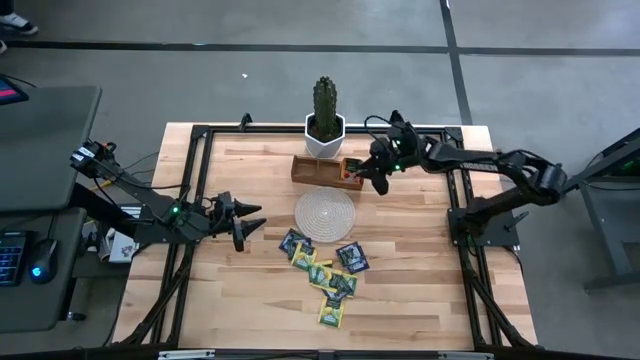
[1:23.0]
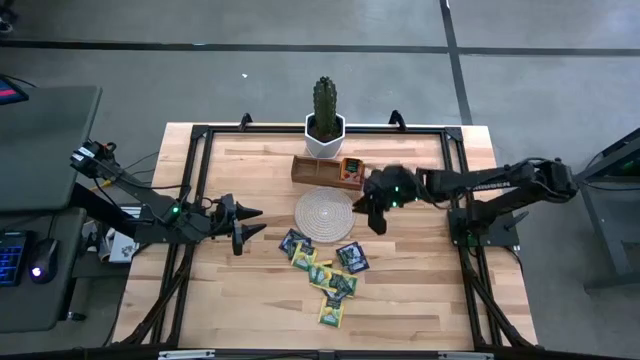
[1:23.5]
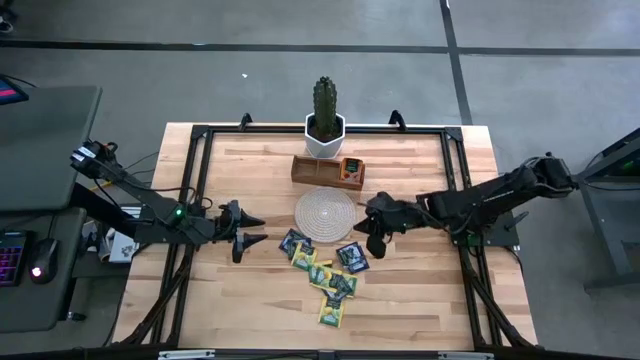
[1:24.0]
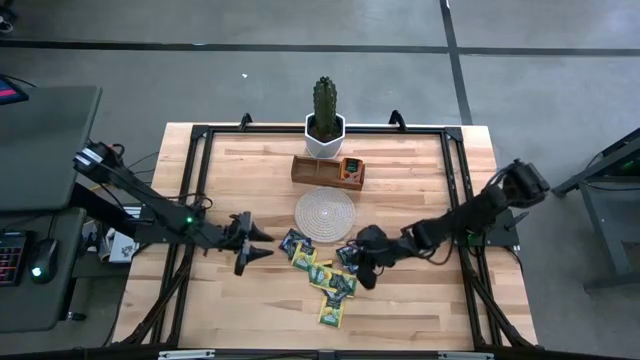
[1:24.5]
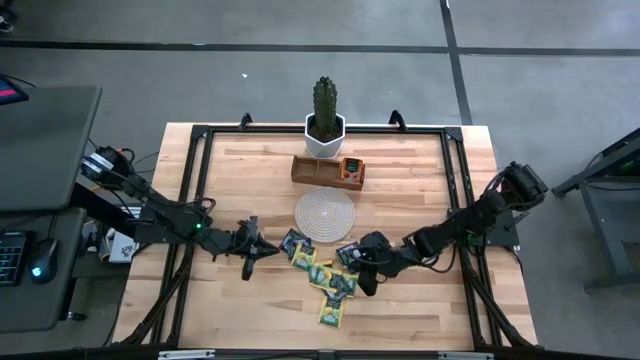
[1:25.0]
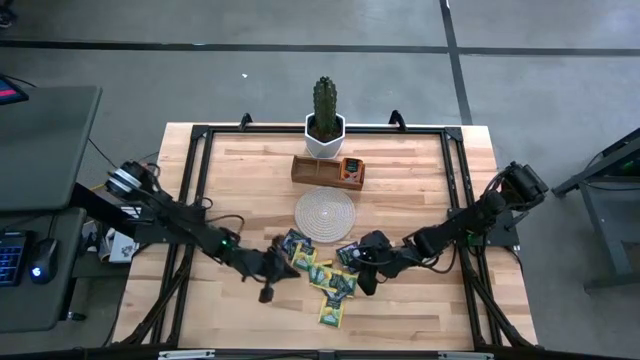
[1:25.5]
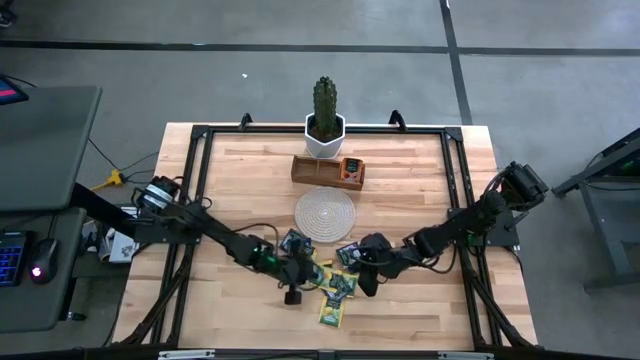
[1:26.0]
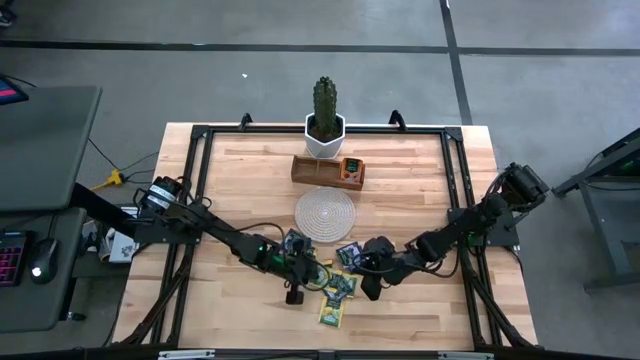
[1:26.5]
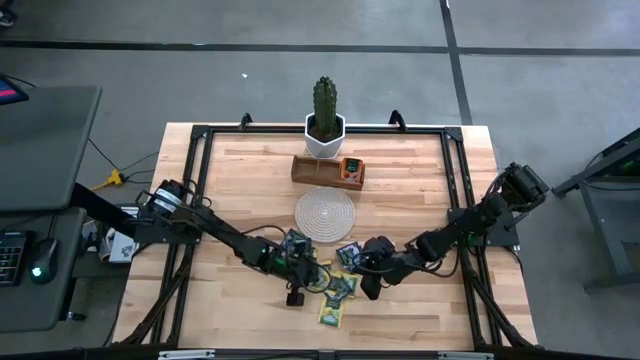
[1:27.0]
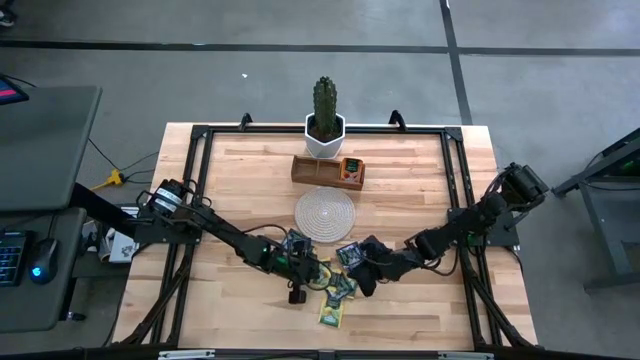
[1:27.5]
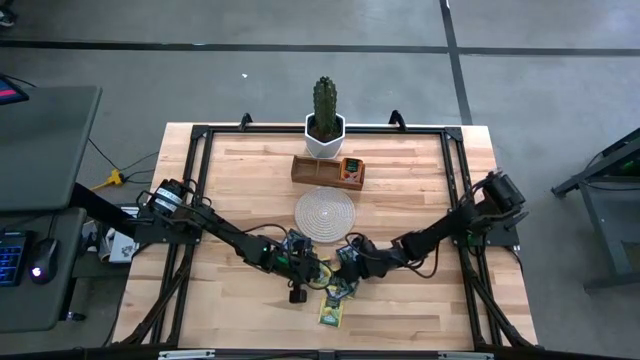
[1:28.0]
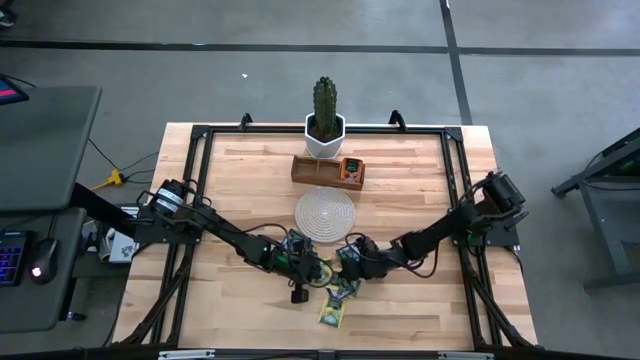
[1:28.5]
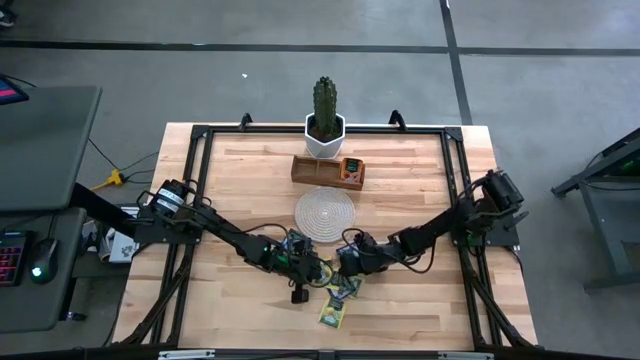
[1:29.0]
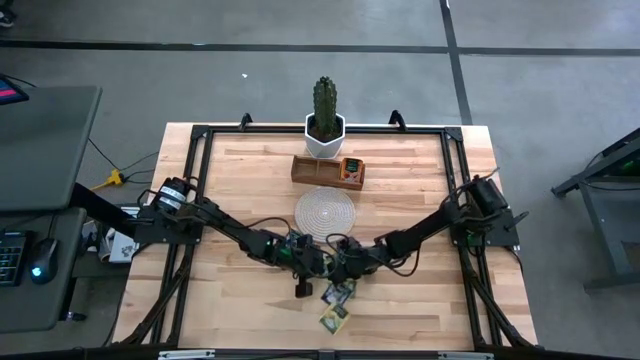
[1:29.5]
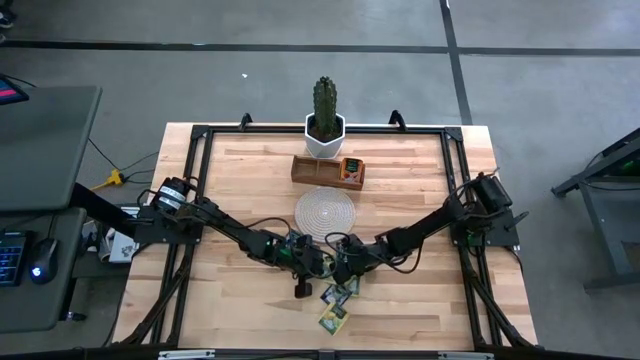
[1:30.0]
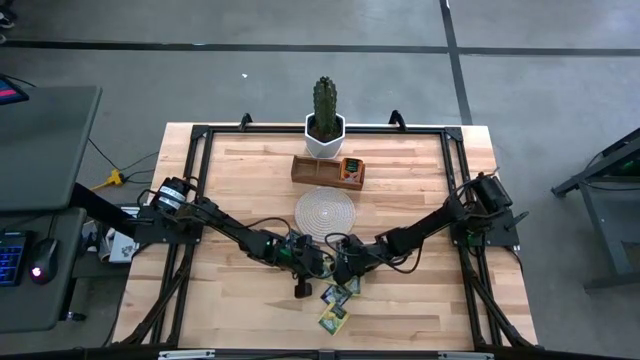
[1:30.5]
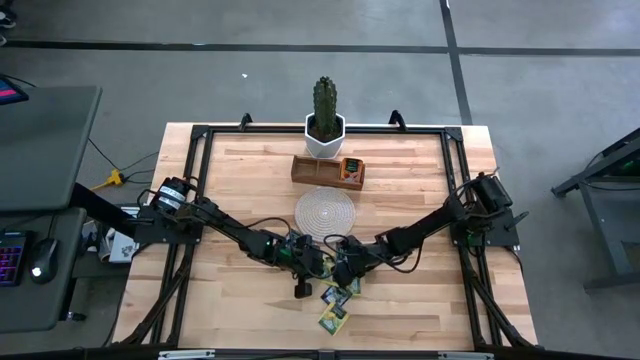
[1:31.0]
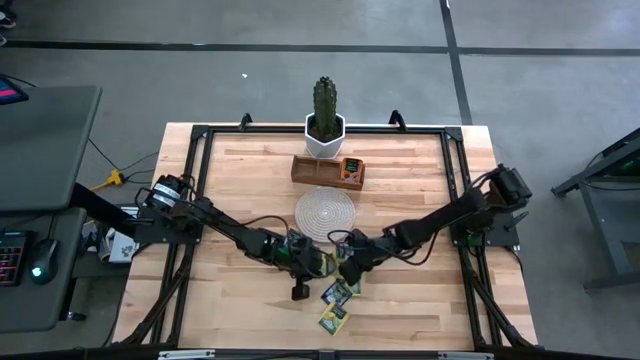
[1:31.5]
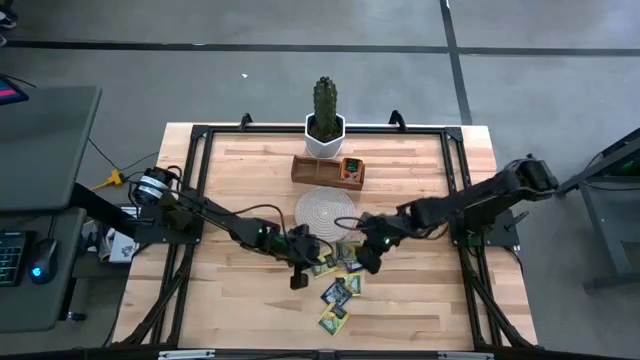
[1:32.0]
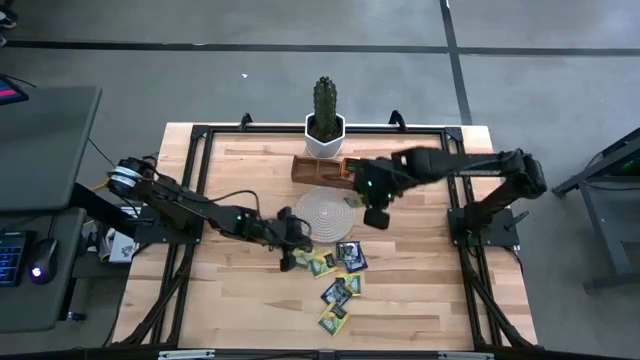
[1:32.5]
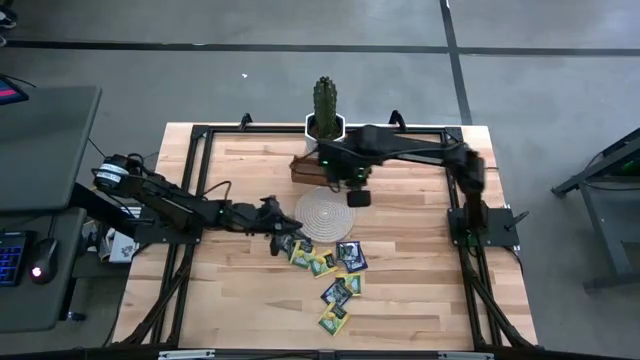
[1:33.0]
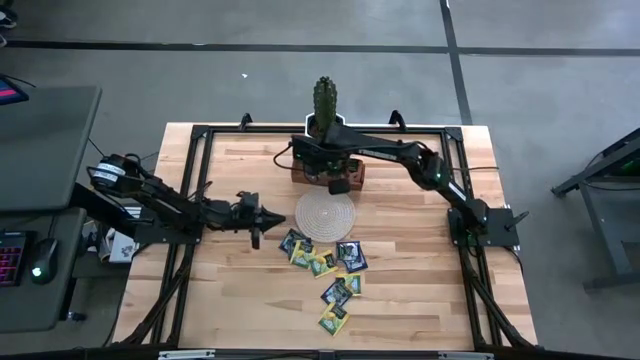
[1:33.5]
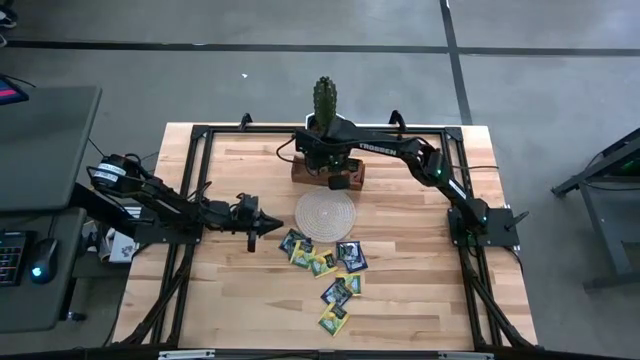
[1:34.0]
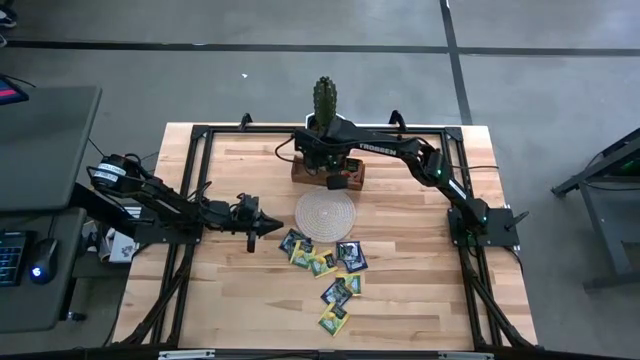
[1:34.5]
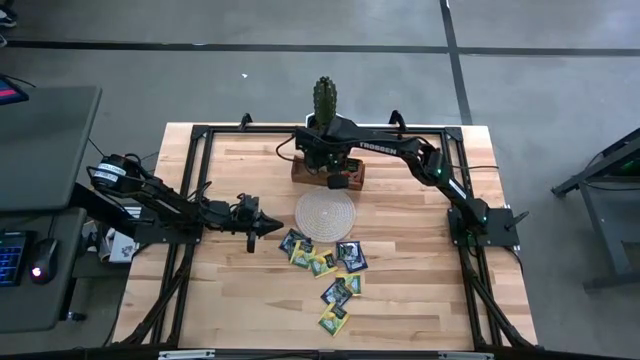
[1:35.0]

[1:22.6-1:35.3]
Task: Pick & Place Tea
Put the yellow tea bag into the middle section of the wooden organizer

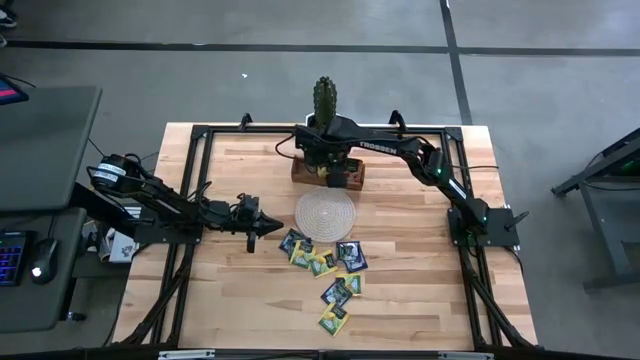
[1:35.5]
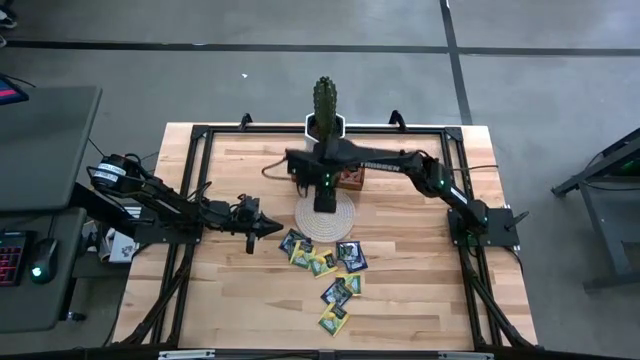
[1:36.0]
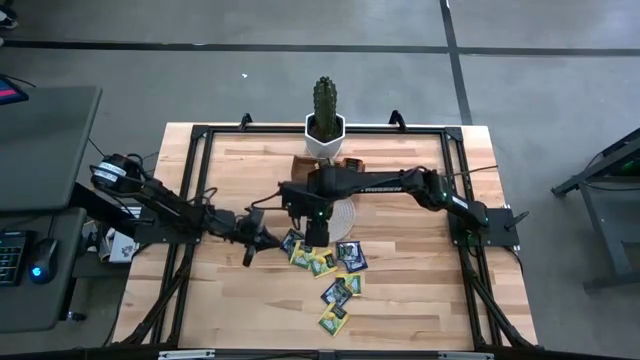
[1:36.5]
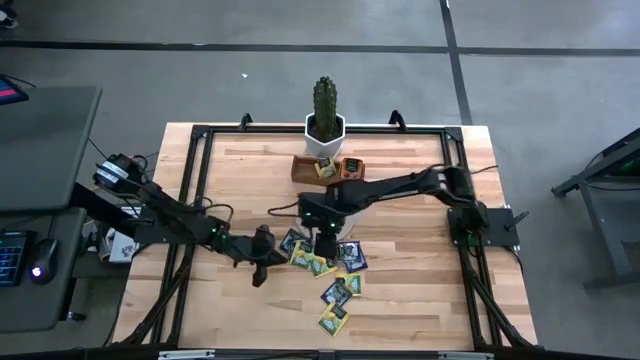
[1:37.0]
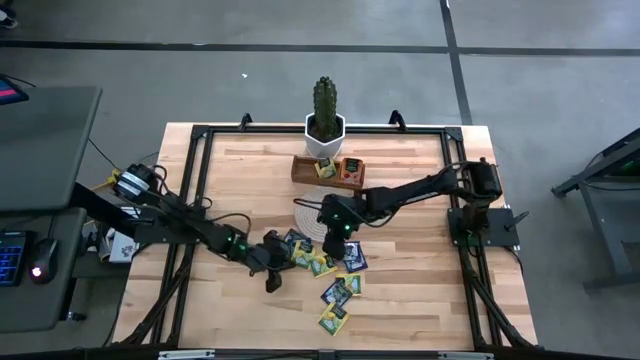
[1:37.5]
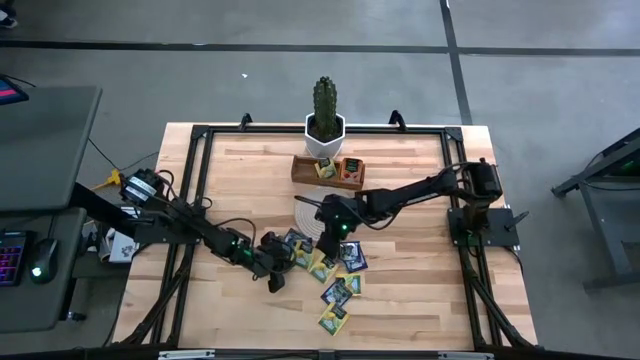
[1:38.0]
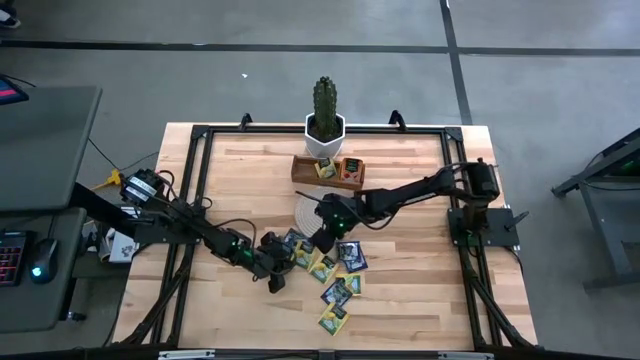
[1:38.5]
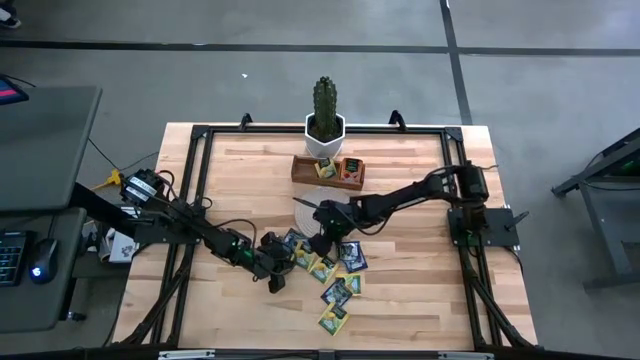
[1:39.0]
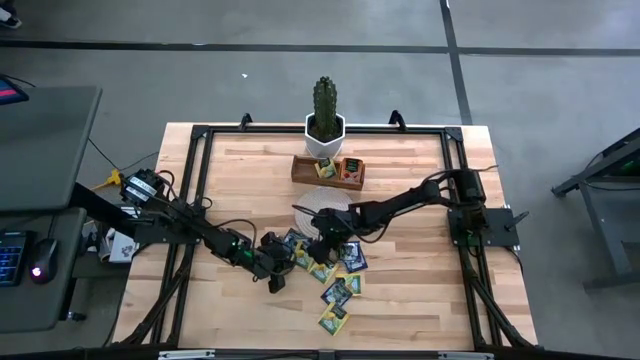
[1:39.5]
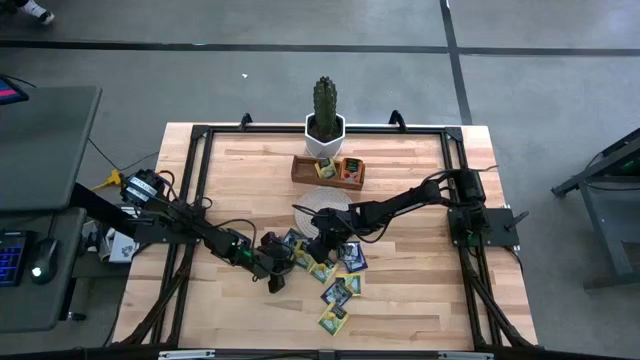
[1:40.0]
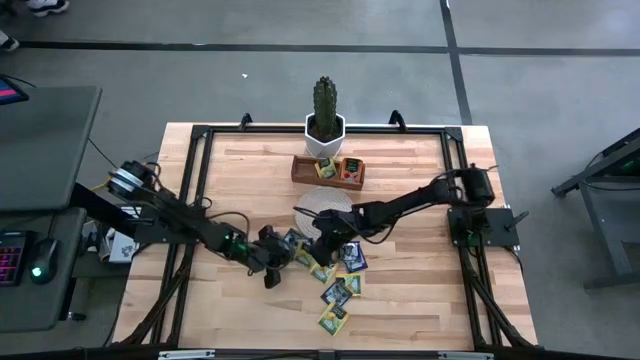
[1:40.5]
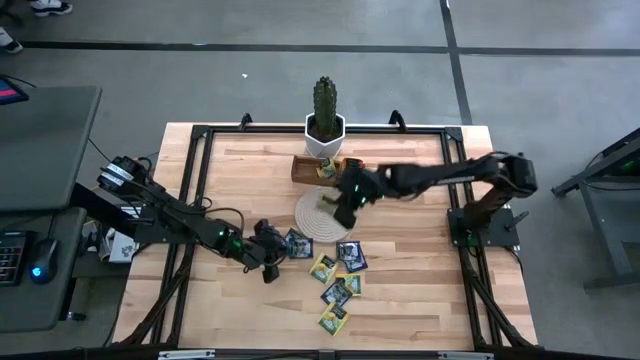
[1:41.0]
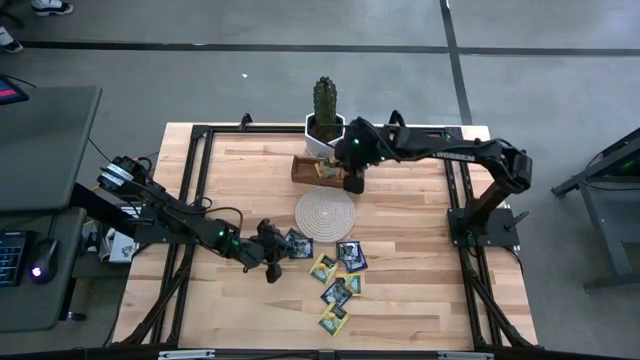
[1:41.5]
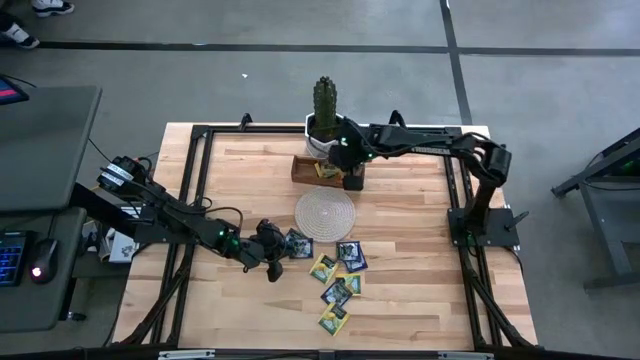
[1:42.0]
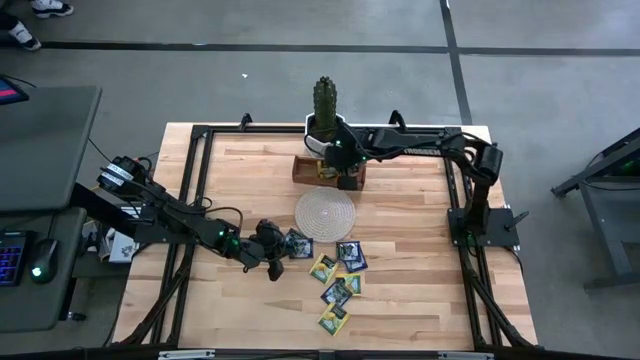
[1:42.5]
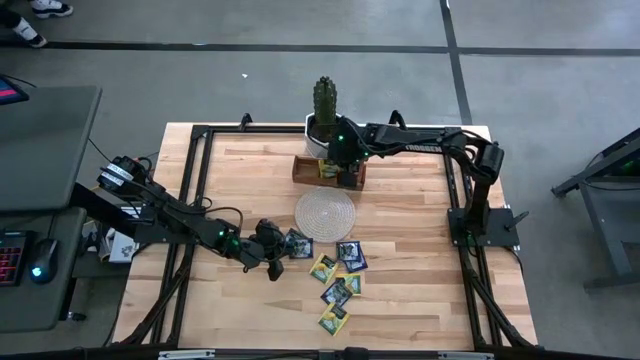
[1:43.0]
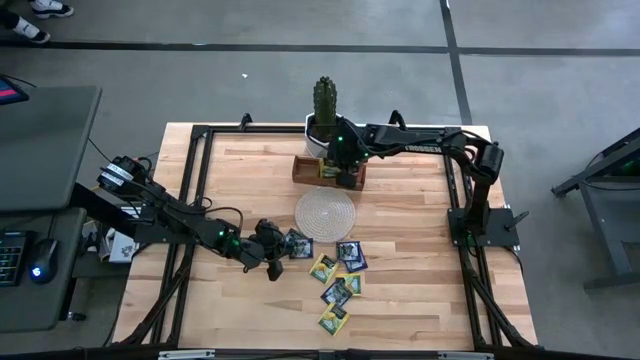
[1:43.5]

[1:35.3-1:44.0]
Put the yellow tea bag into the middle compartment of the wooden organizer

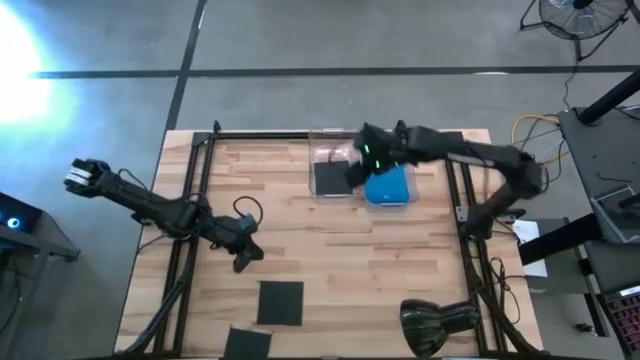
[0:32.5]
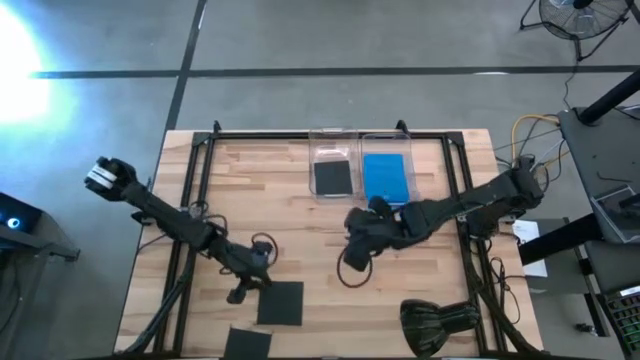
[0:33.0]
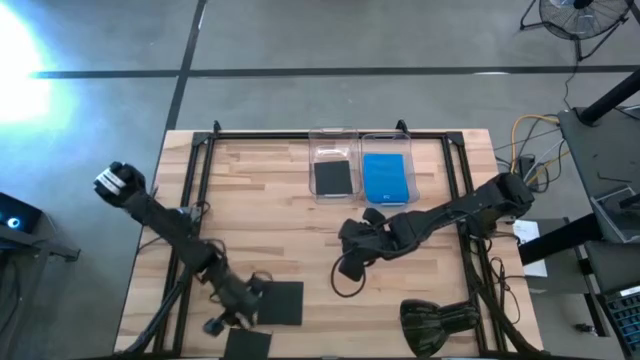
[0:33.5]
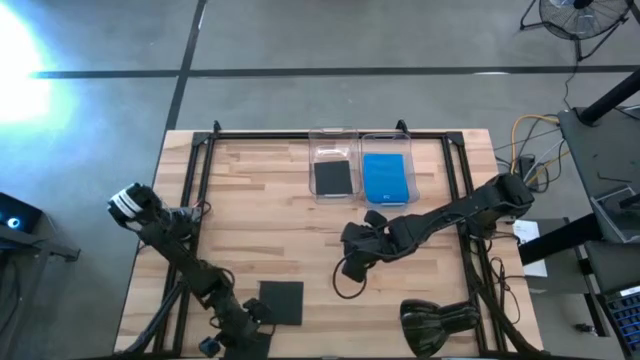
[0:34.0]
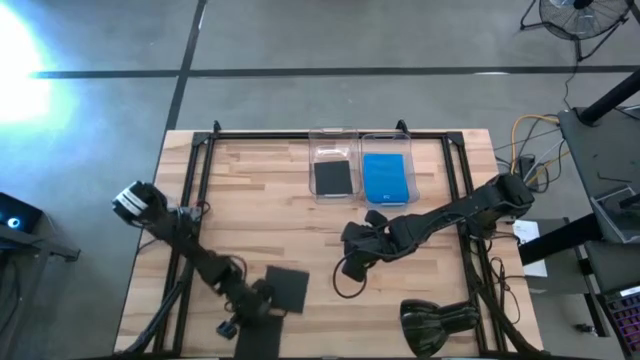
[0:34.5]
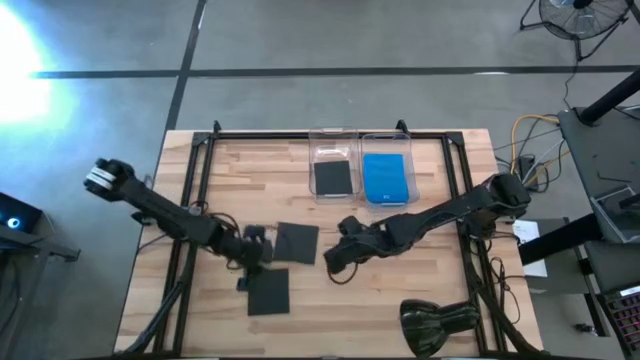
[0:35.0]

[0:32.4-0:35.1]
Task: Pick & place jewel cases by type
Move the bottom black CD case to the middle left of the table
